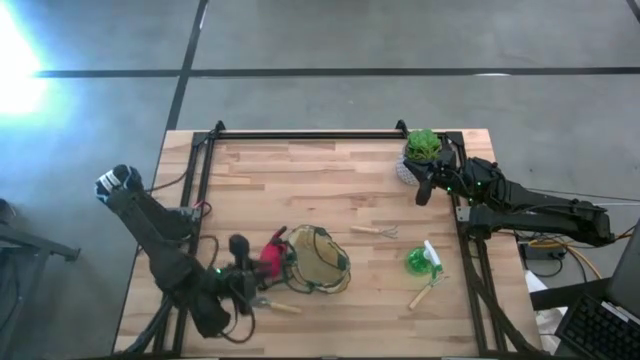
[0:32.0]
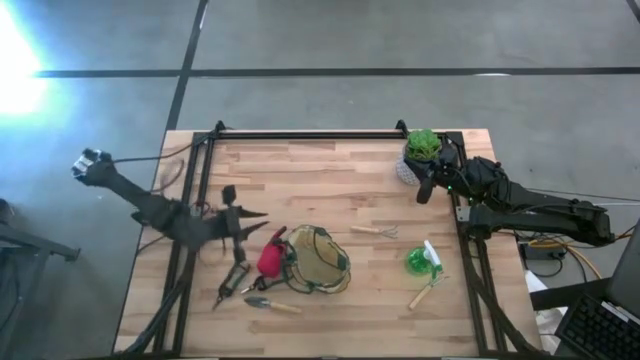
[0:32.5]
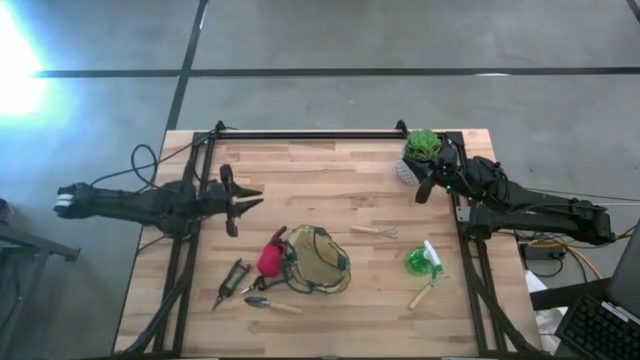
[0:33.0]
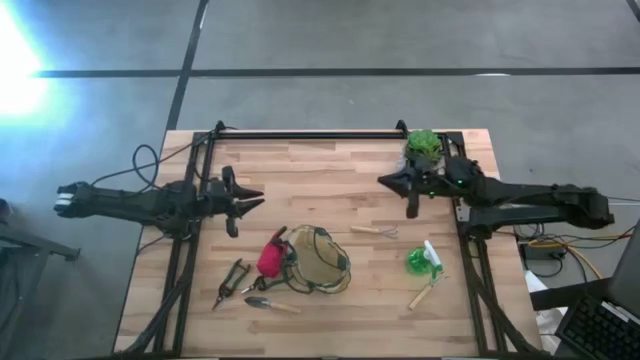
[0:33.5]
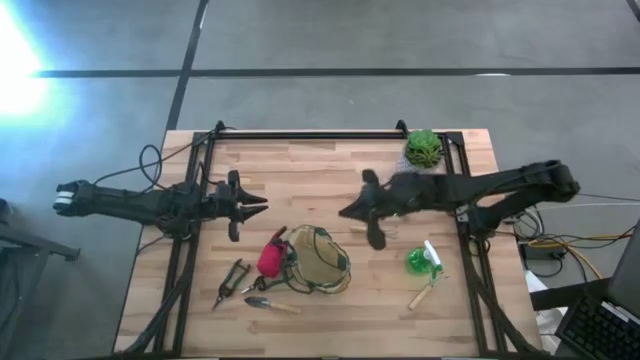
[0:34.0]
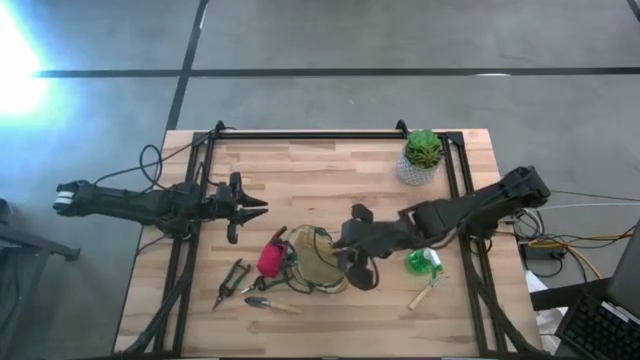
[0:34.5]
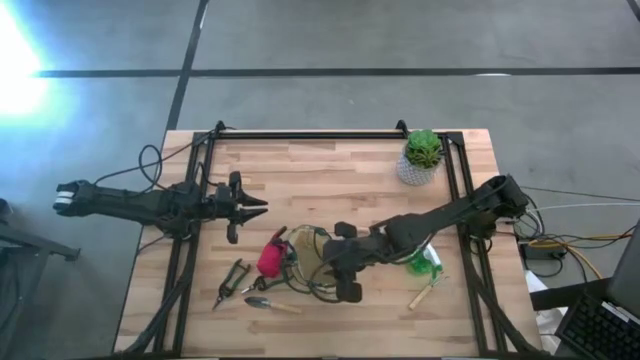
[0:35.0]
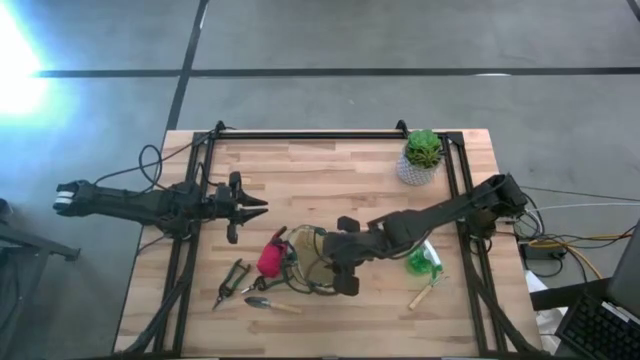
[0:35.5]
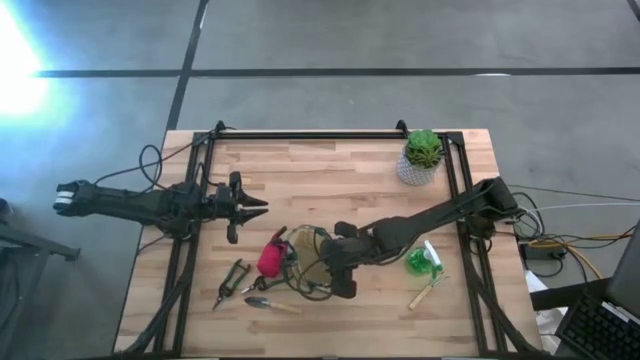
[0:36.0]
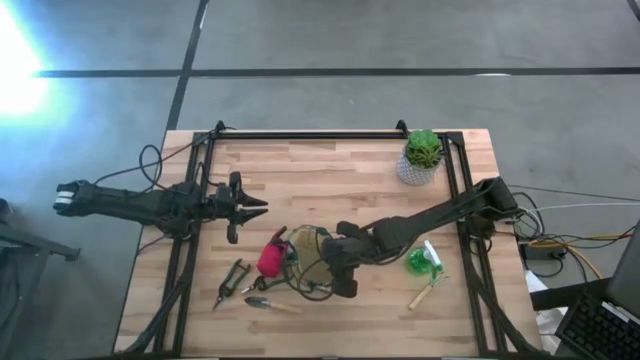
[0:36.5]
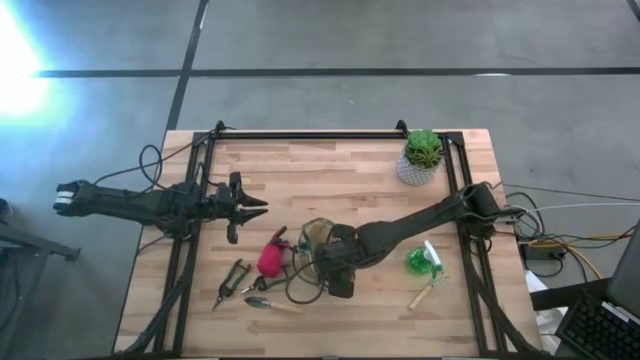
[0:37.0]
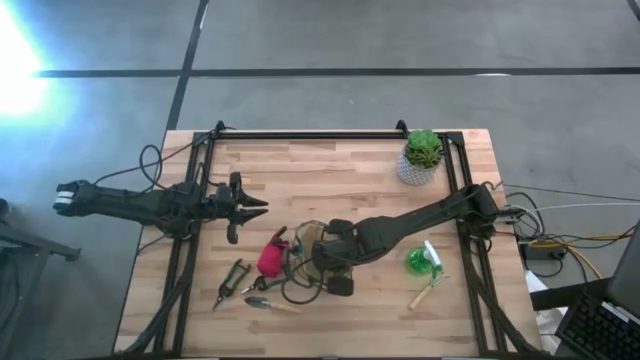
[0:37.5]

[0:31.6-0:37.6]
Task: Pick & Place Garden tools in Gardening bag
Prepare the light brown gardening bag on the table

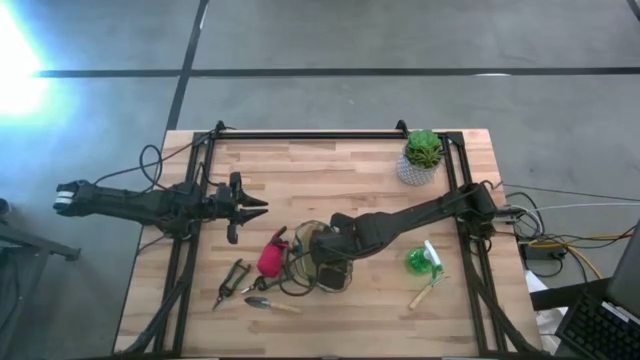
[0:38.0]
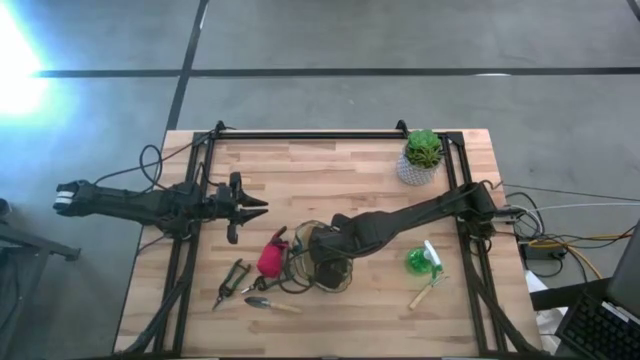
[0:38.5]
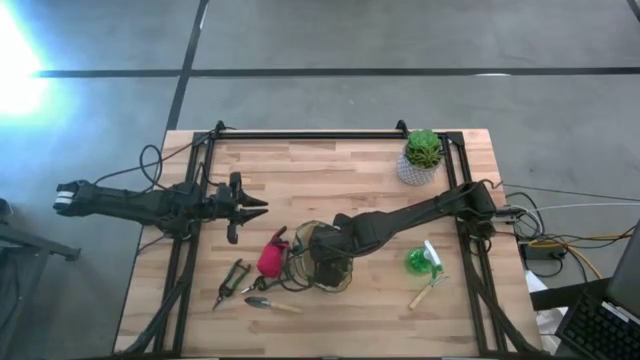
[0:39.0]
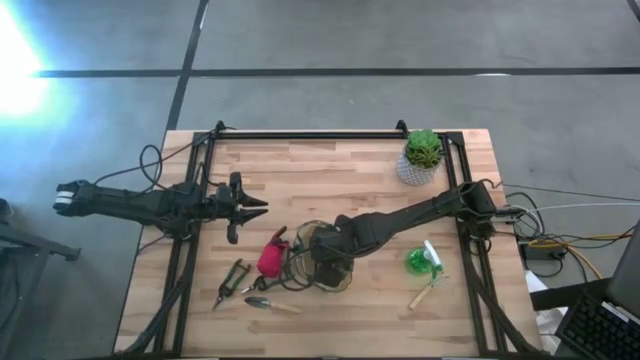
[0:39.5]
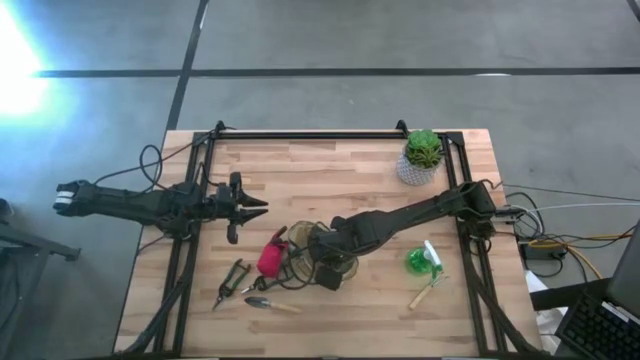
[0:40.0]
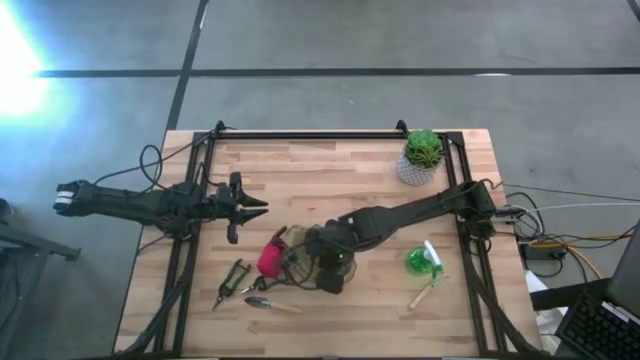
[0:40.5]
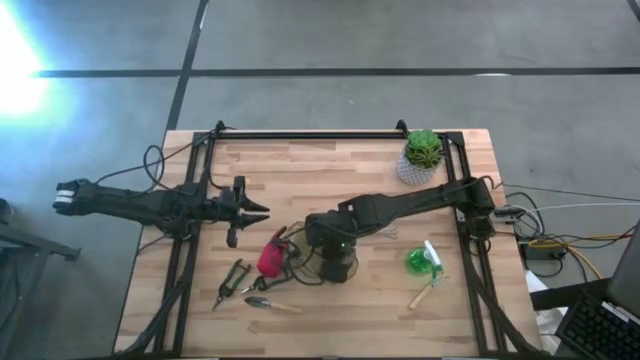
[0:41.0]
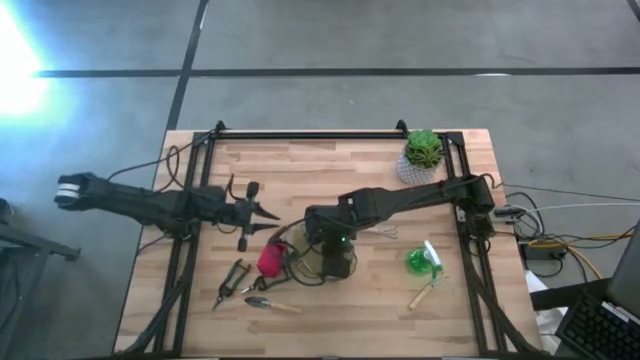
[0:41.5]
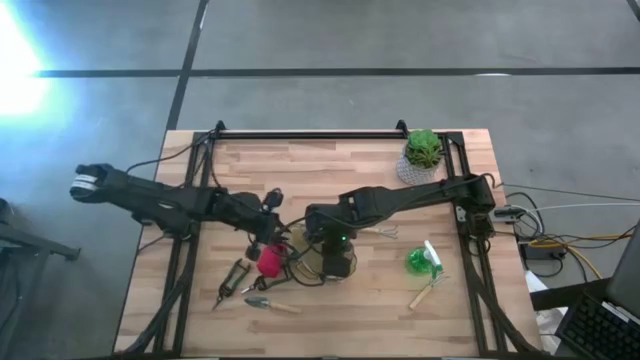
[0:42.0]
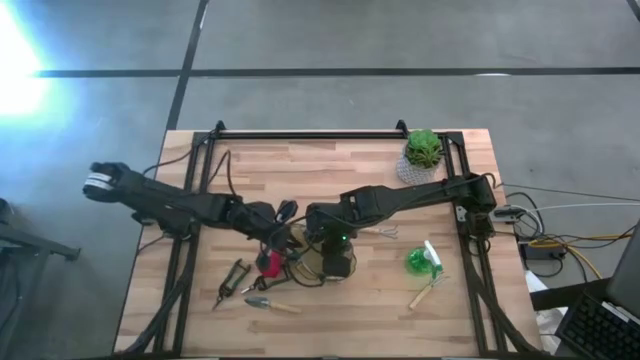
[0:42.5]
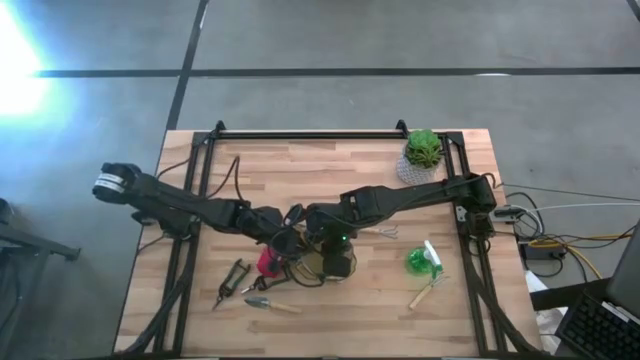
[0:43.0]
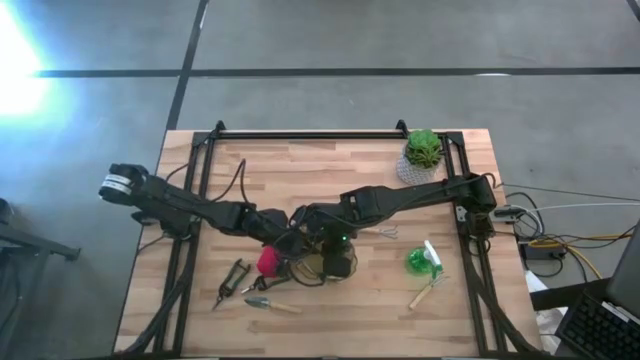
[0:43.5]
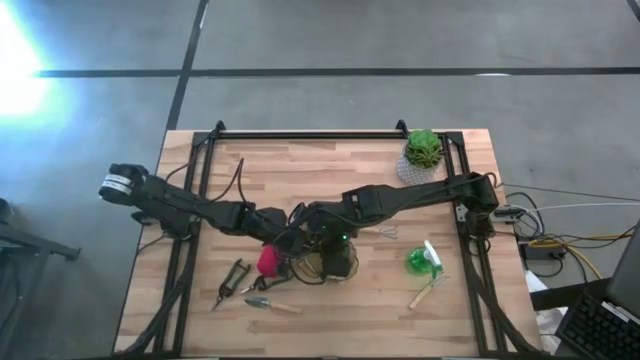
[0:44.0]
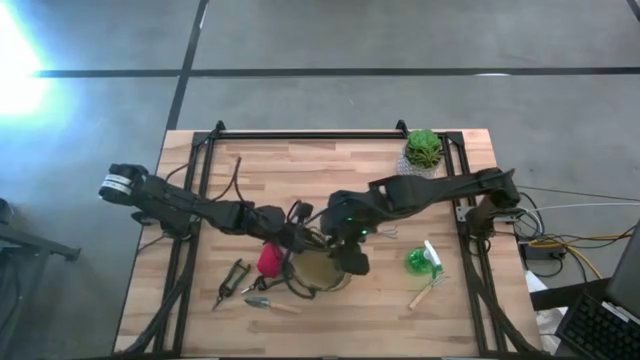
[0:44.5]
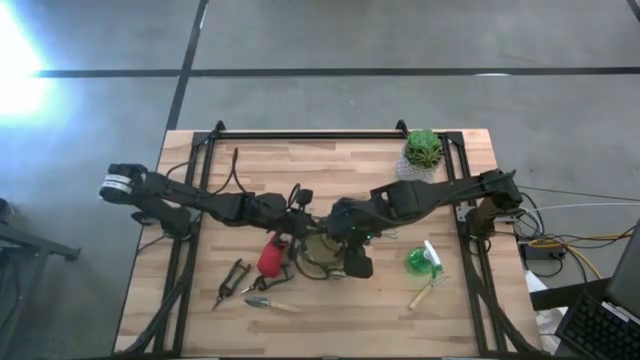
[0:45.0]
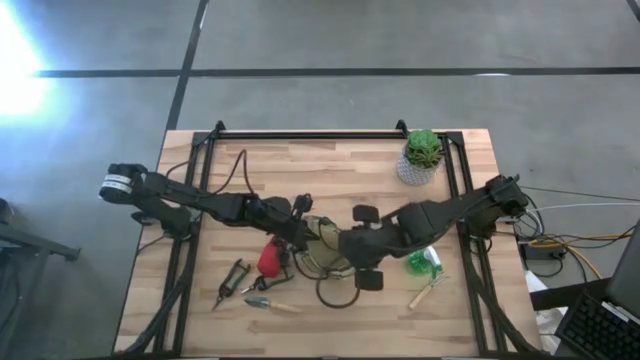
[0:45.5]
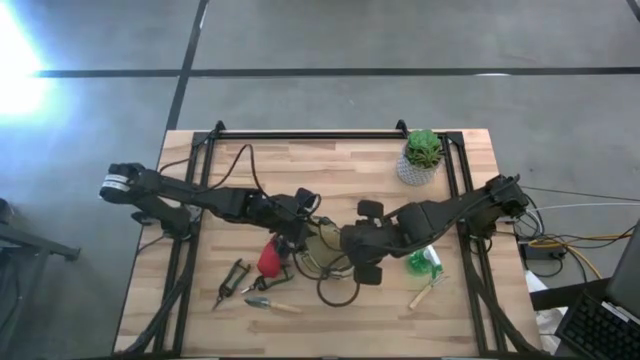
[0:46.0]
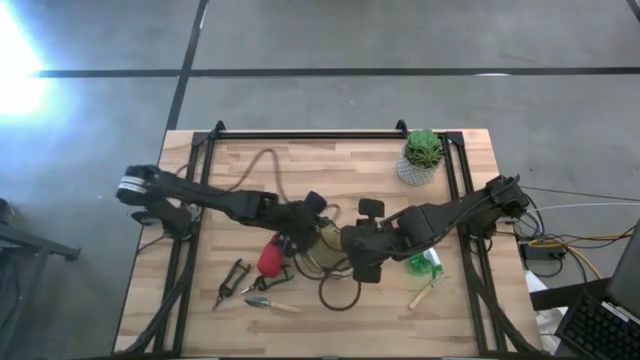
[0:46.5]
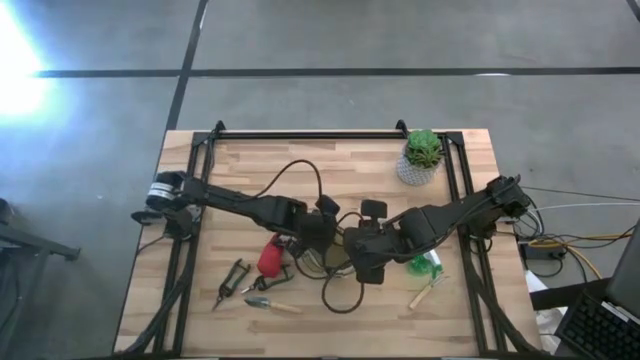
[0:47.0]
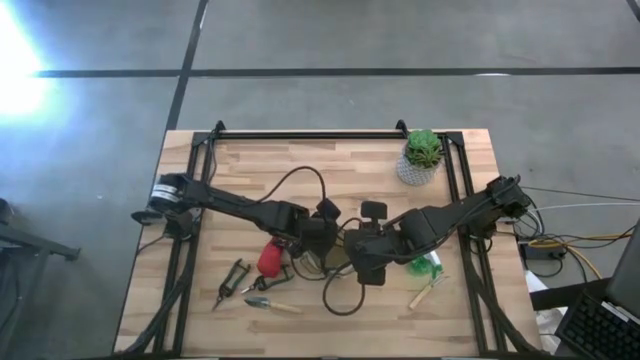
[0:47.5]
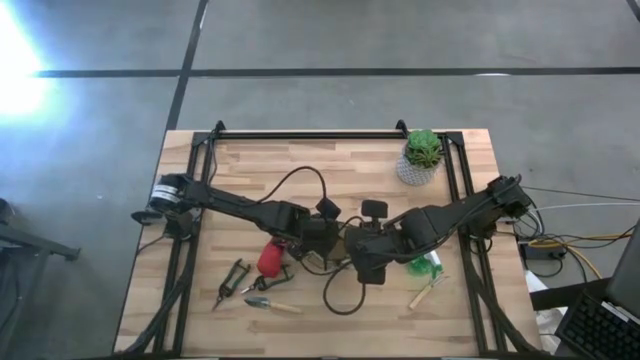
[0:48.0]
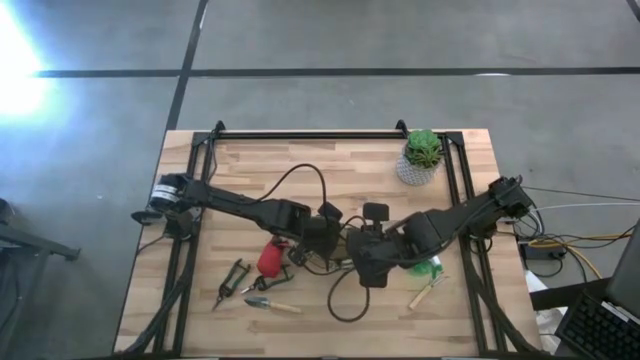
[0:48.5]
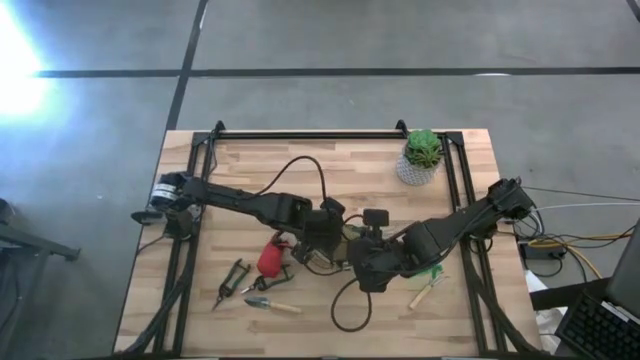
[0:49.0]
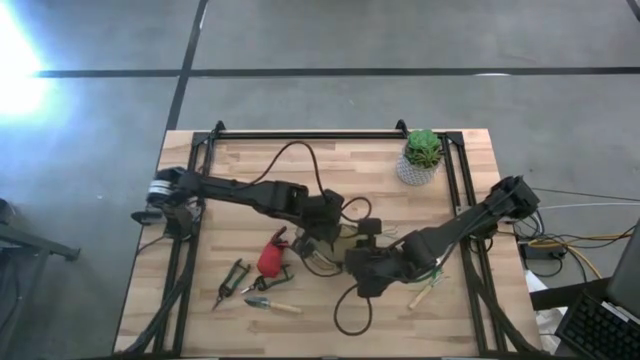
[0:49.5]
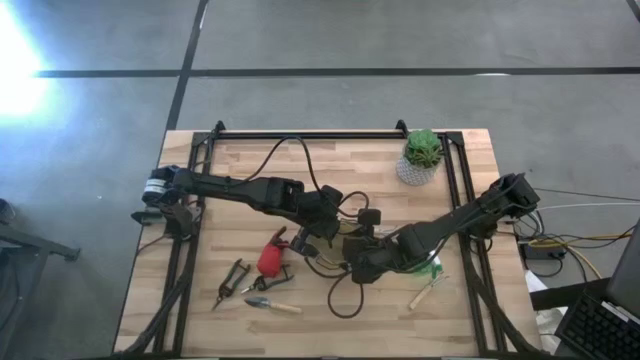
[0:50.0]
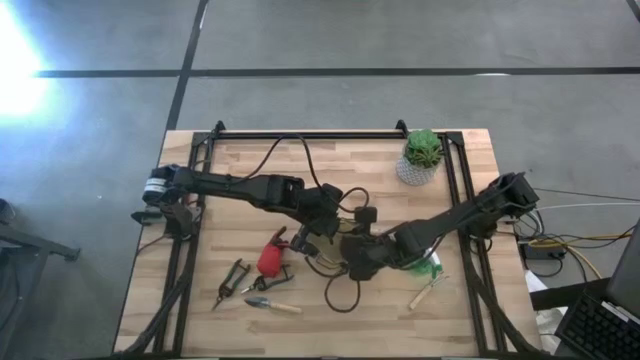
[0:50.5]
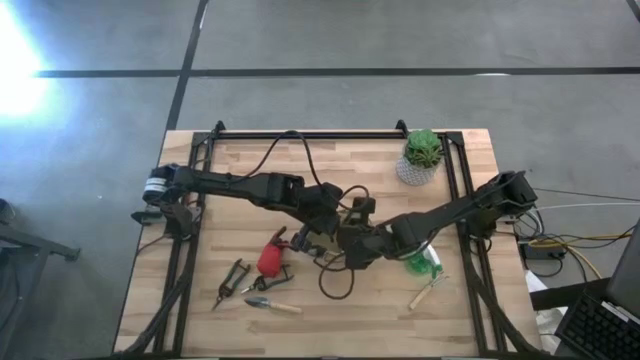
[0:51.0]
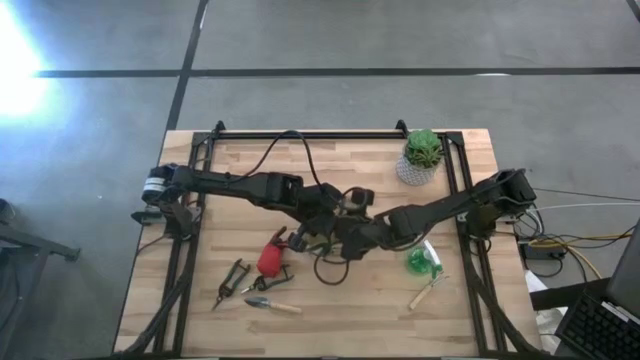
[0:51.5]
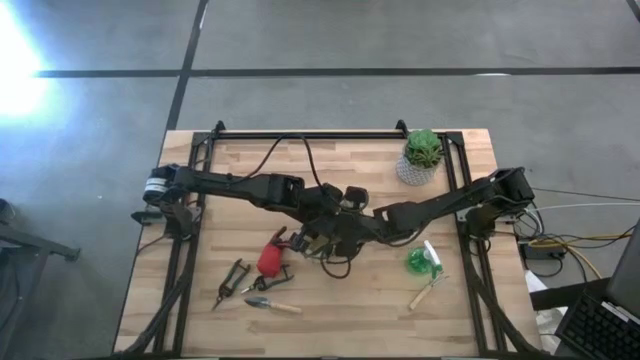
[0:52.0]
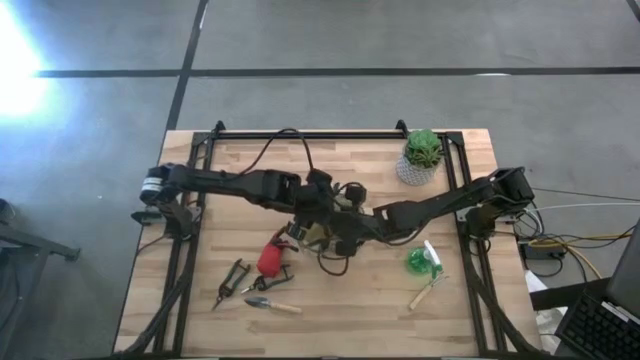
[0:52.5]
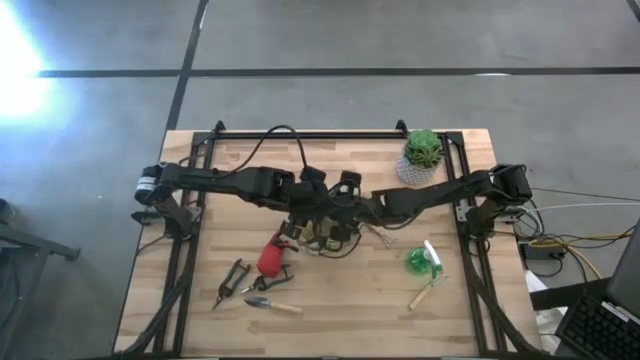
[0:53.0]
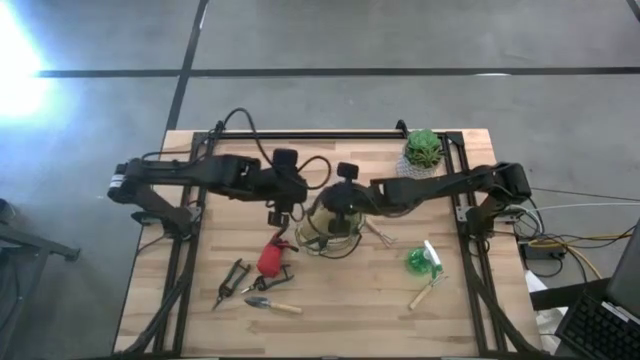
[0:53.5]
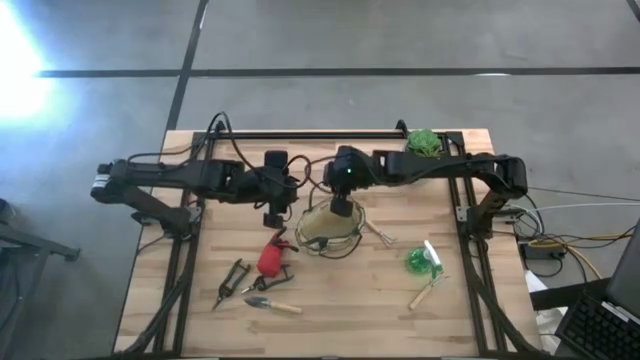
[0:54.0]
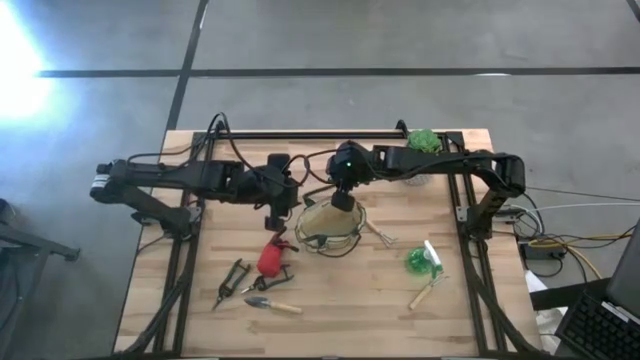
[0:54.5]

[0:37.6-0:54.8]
Prepare the light brown gardening bag on the table
